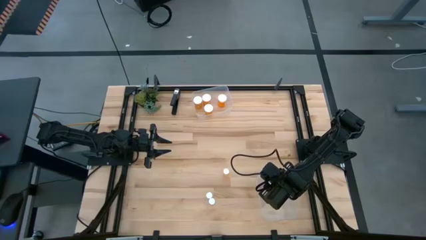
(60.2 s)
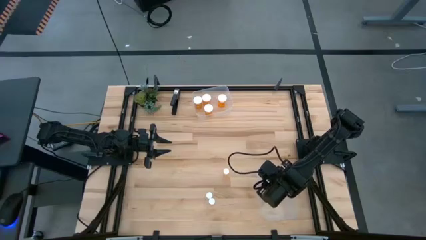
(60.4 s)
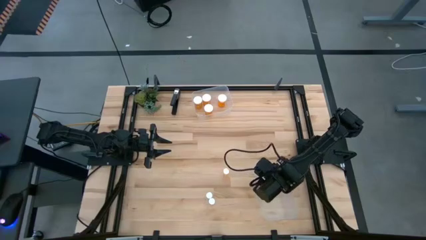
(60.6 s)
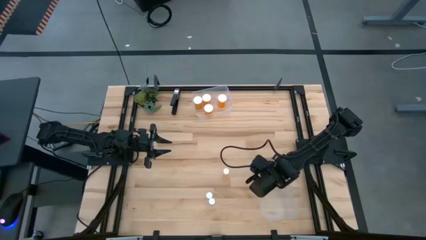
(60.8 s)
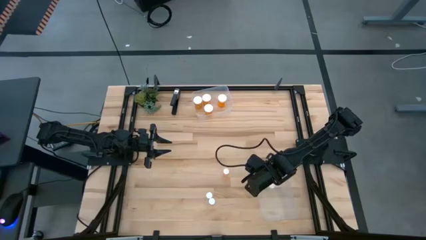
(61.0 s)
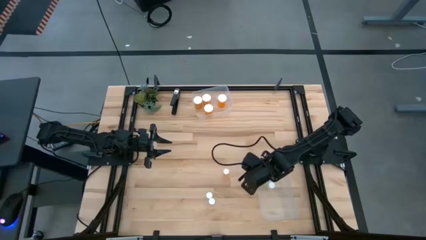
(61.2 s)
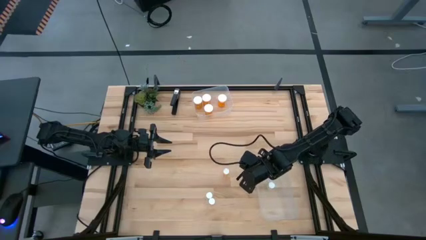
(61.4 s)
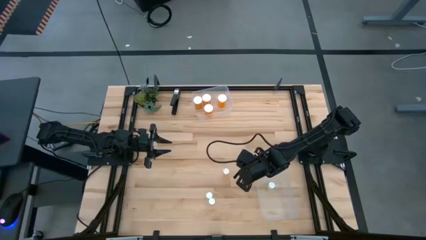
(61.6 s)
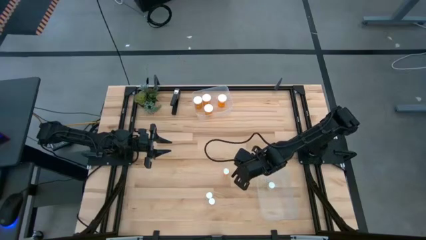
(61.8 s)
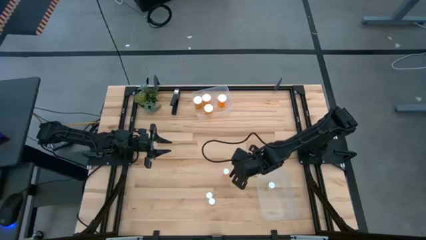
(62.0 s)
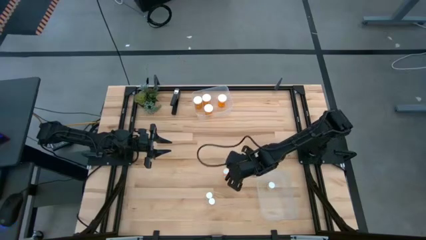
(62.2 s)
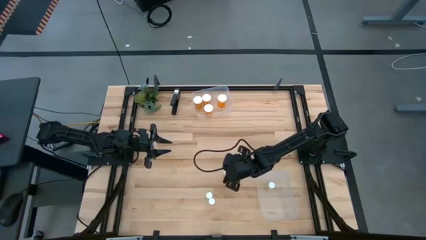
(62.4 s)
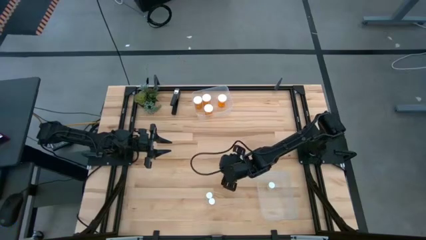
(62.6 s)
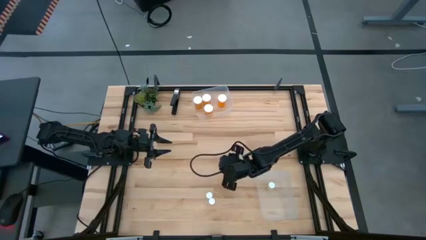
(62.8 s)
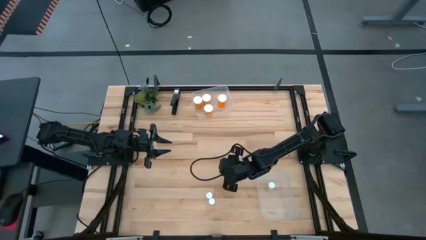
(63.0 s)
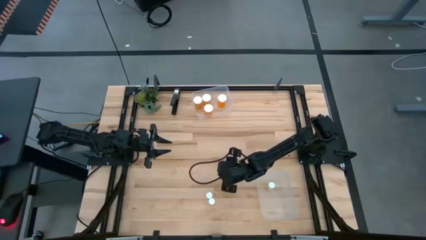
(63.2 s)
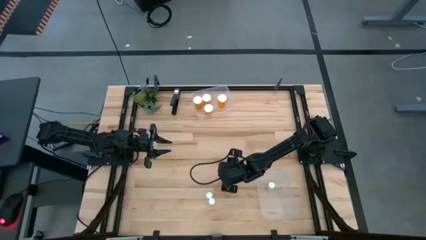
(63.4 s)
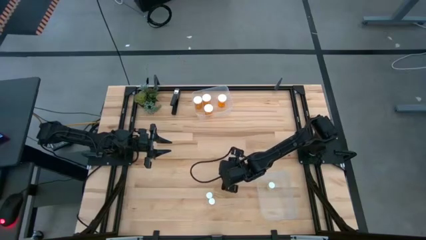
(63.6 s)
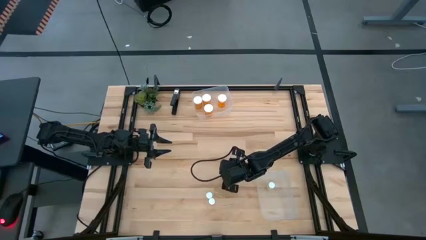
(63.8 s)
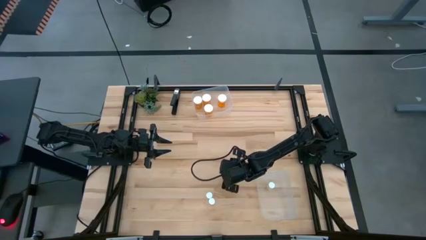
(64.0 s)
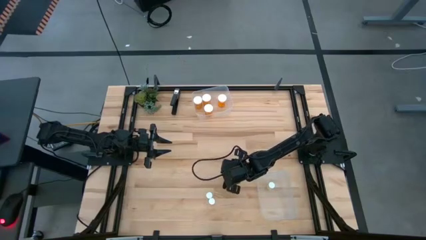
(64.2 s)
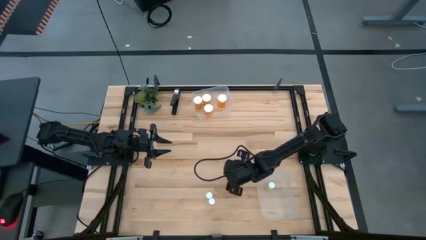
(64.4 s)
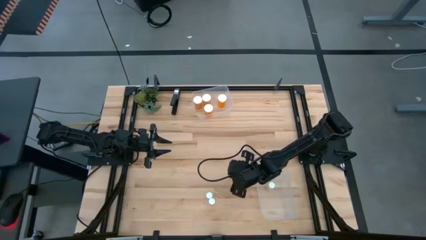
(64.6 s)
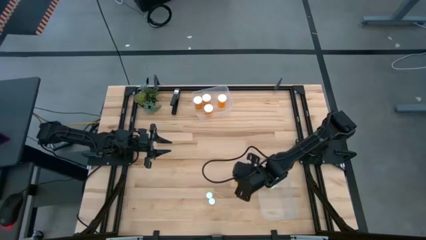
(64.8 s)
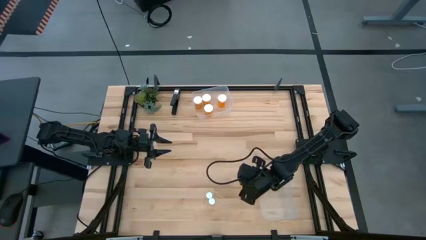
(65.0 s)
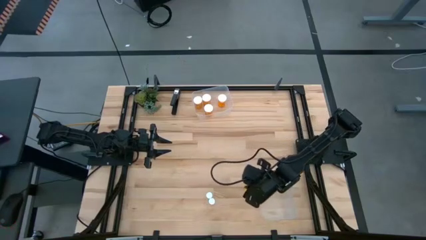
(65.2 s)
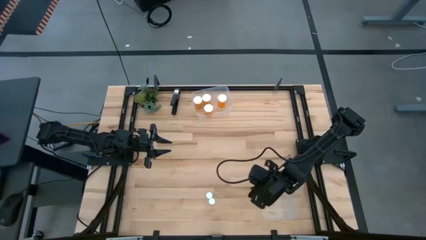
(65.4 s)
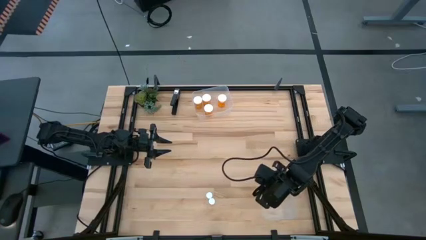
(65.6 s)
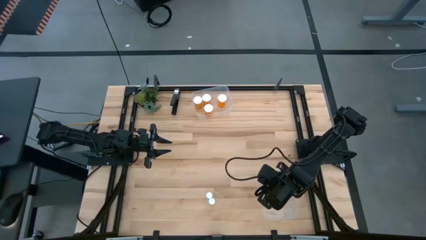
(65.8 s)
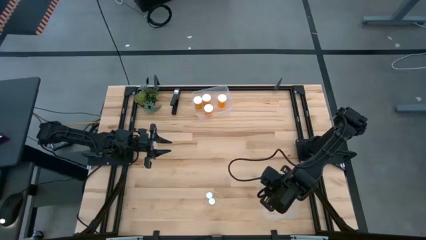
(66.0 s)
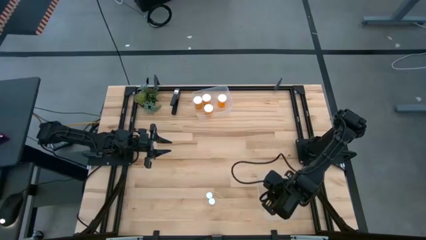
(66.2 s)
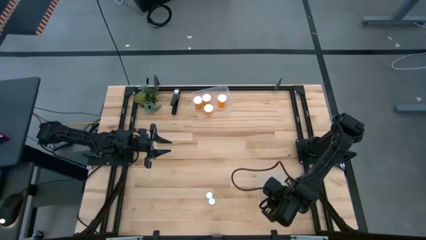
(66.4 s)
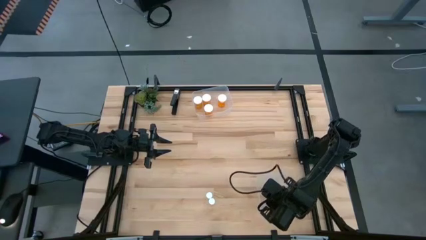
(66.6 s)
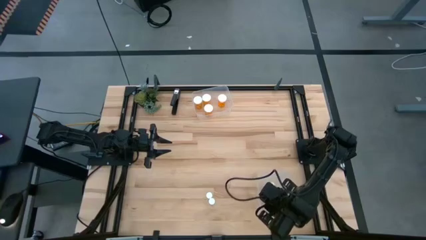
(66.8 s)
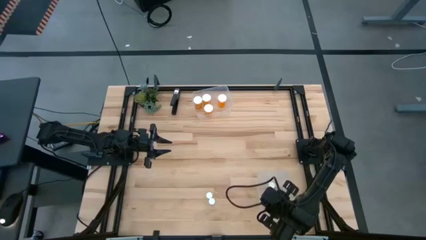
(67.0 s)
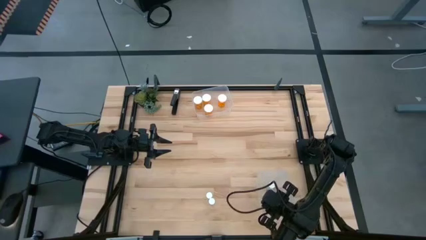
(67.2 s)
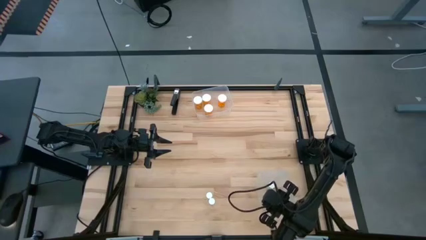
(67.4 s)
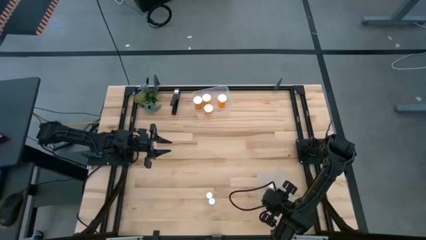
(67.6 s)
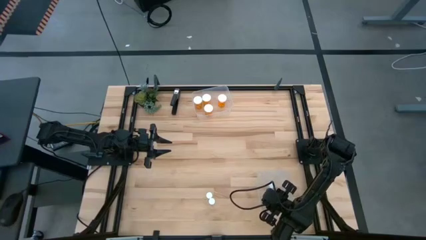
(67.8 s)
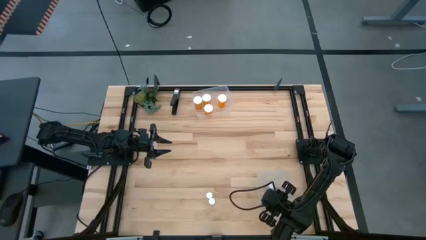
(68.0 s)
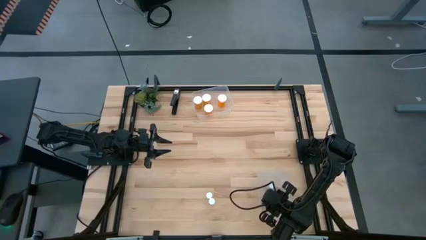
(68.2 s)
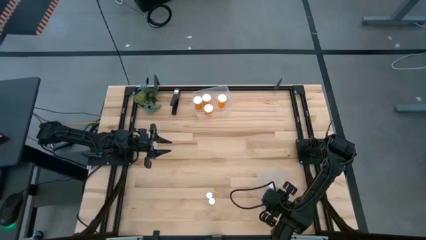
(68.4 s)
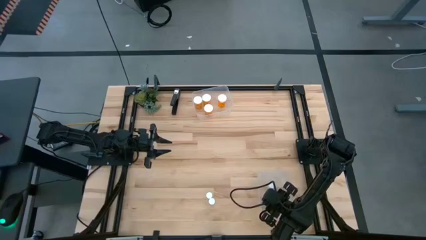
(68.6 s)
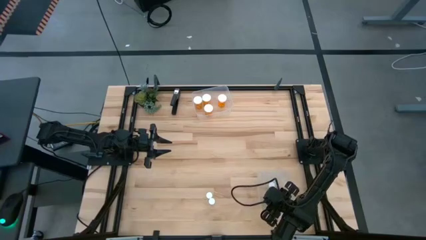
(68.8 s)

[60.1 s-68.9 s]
Task: Pick and place medicine bottles into bin by pill shape (circle, oval)
Put the small orange pill bottle into the bottom transparent bin
